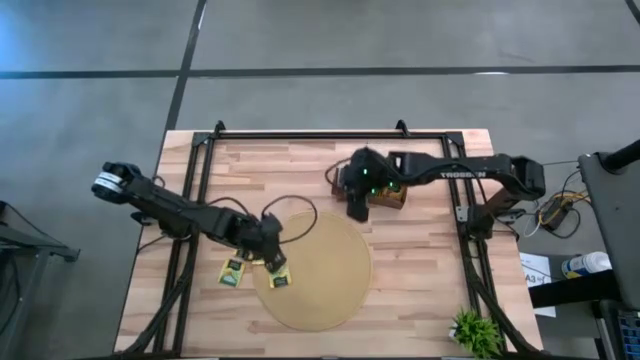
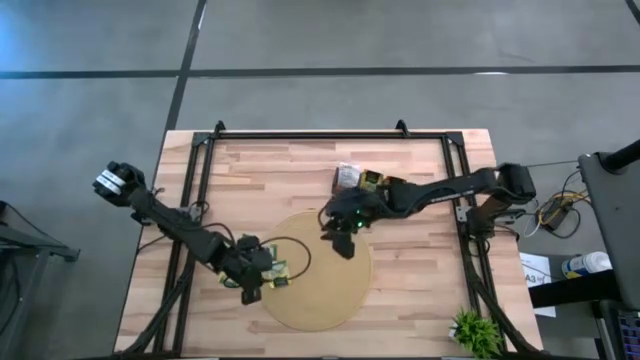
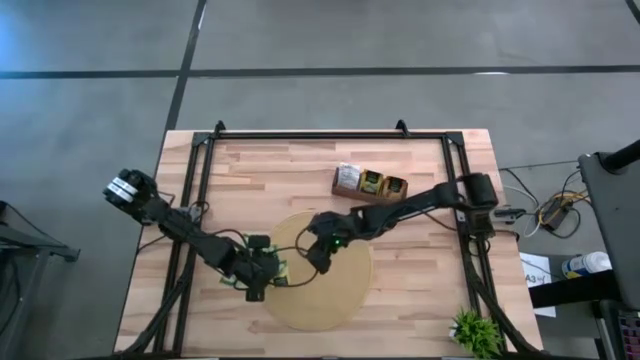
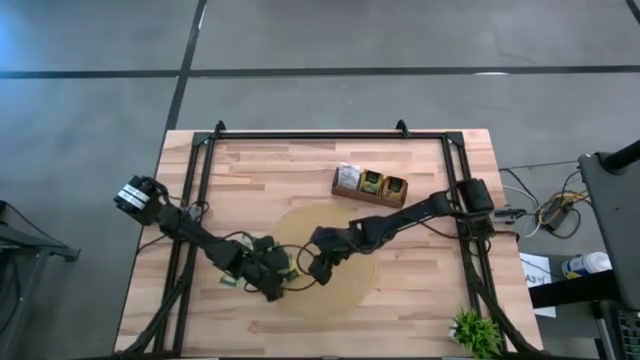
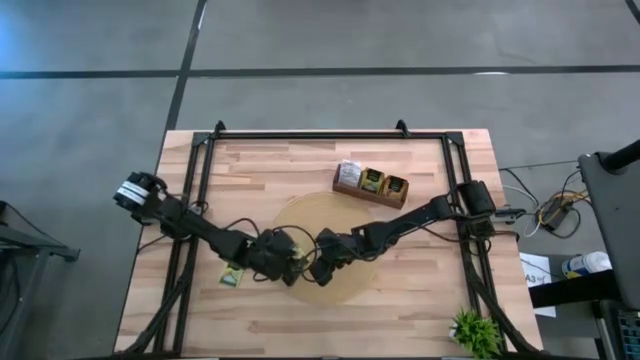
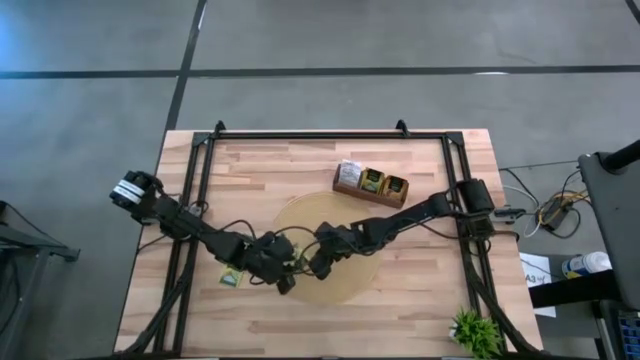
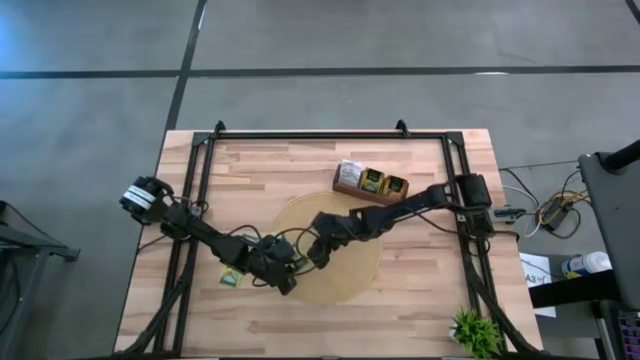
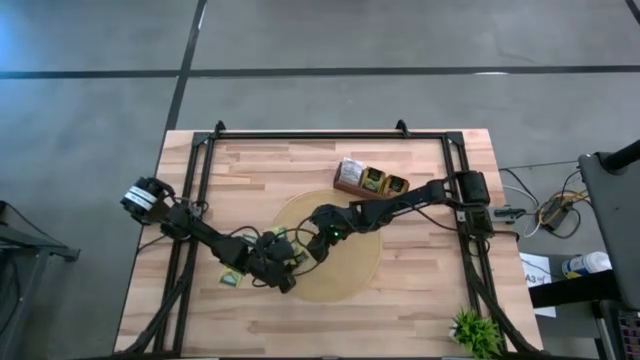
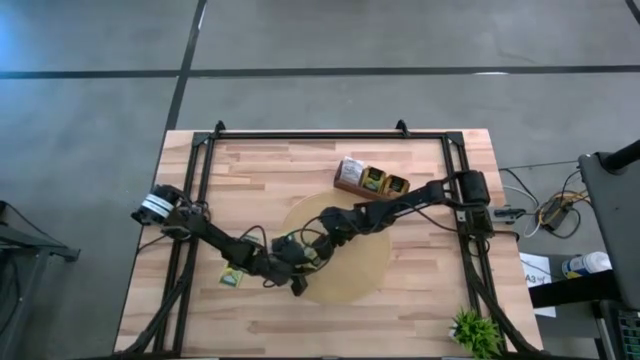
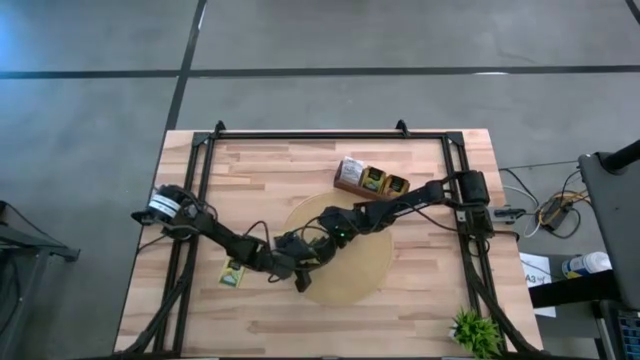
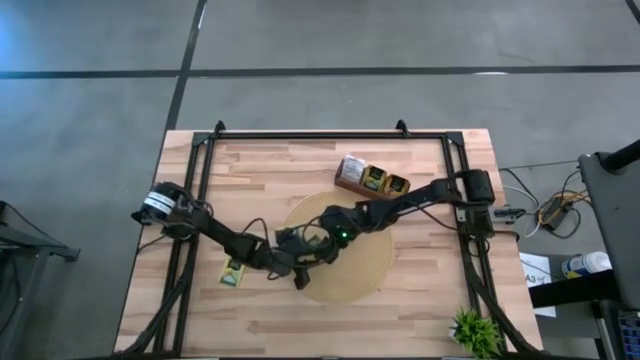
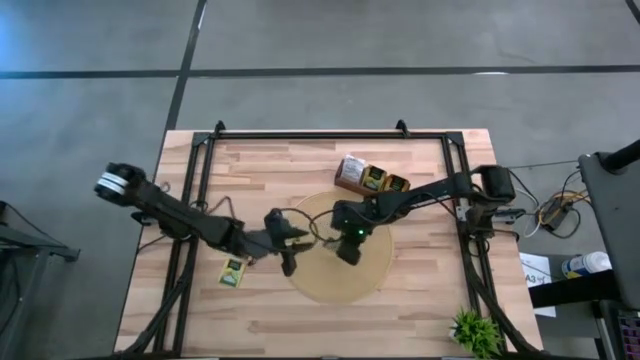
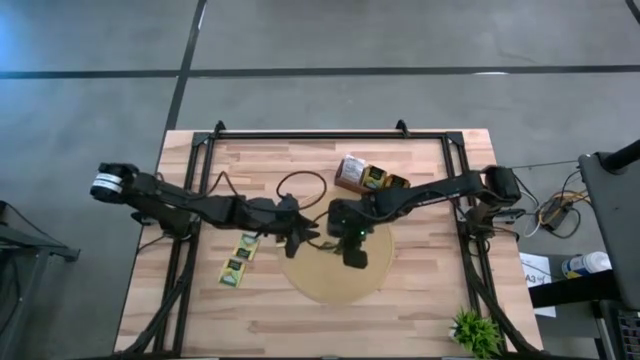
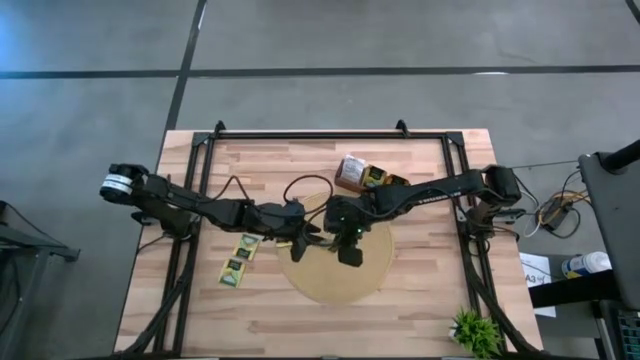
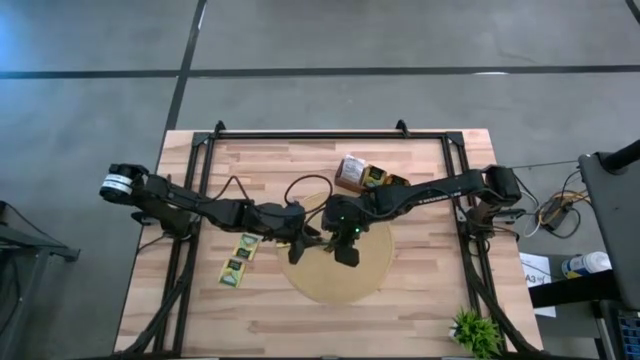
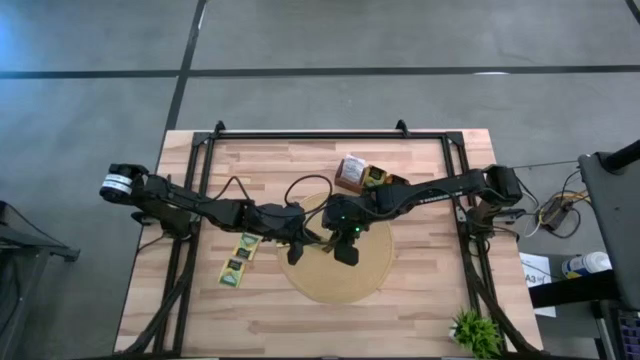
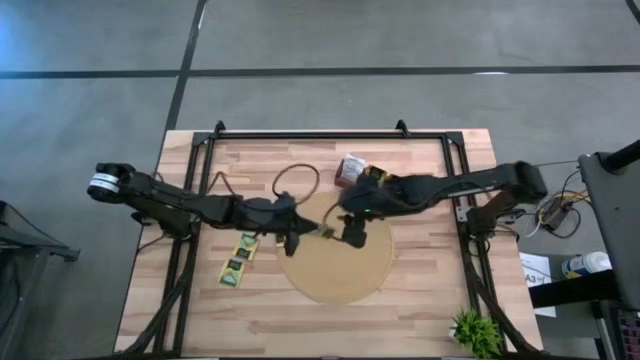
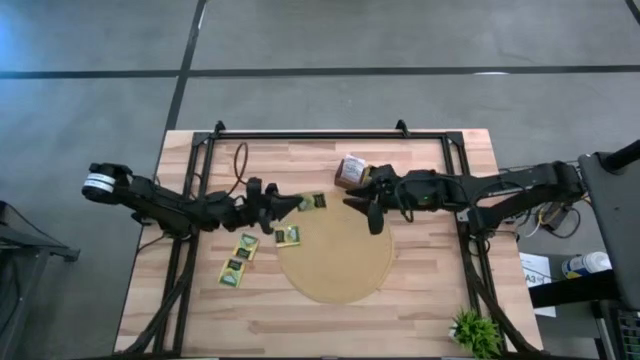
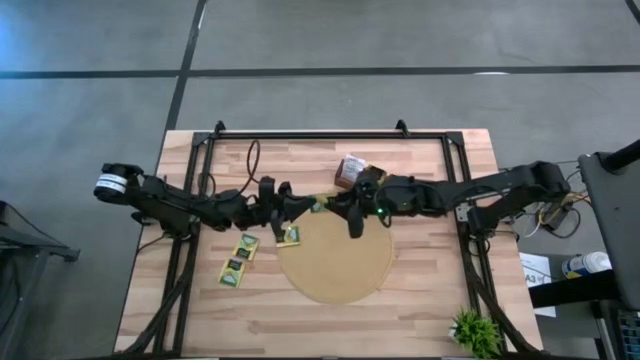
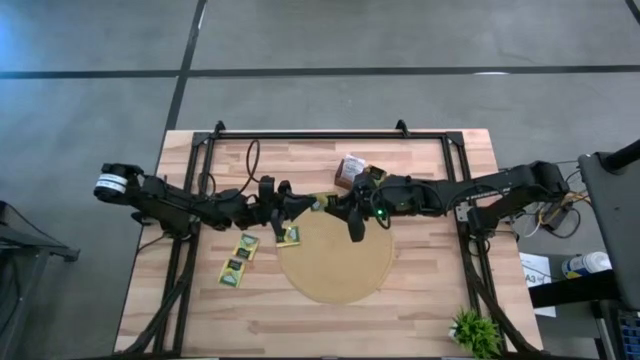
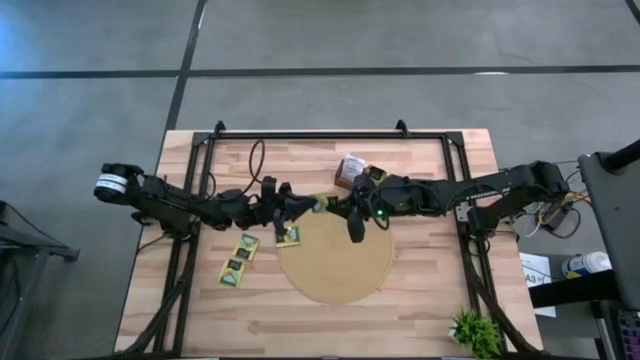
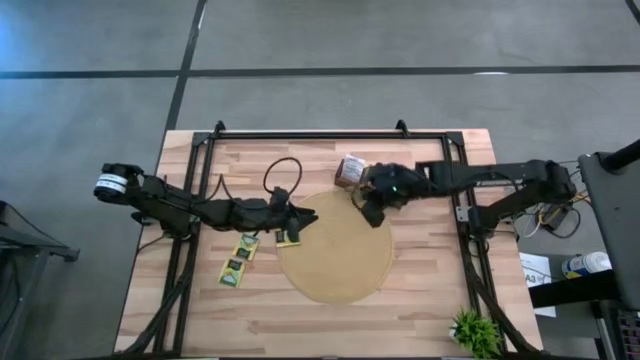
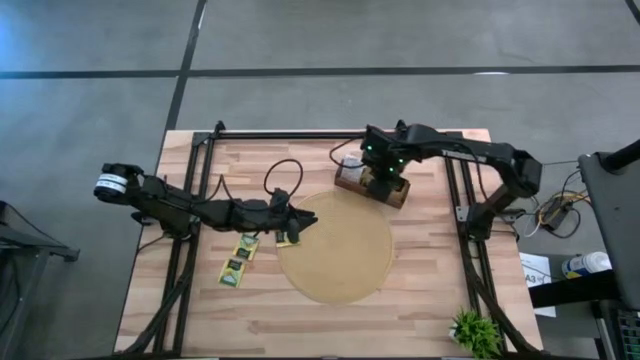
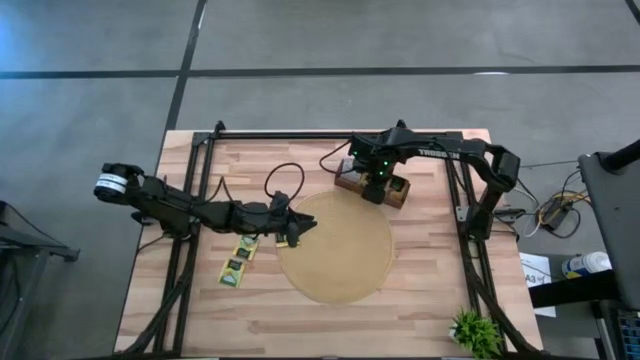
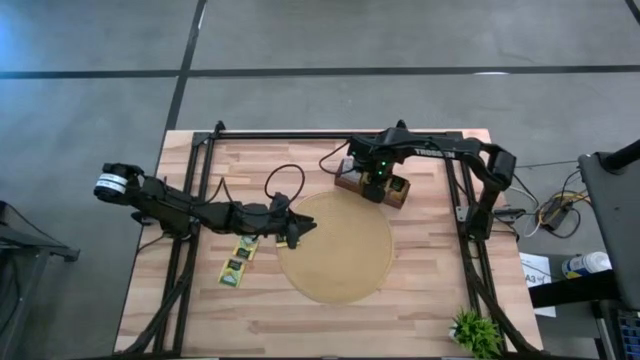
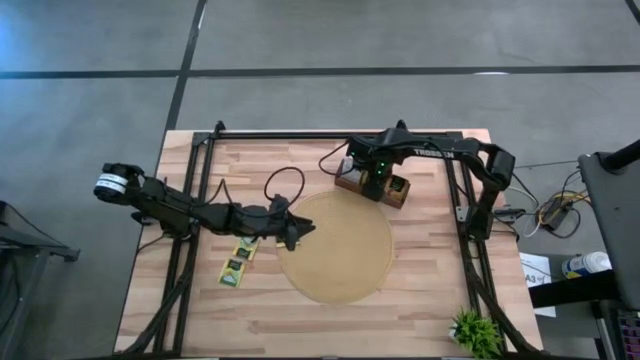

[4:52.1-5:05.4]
Task: Pick & Place Tea
Put the lemon tea bag into the middle section of the wooden organizer
